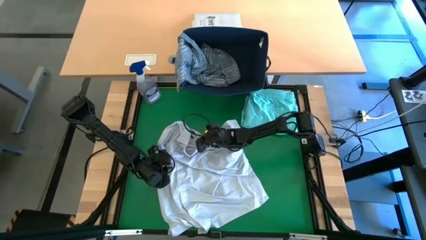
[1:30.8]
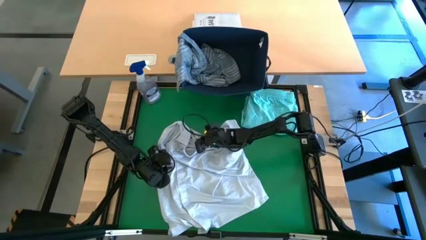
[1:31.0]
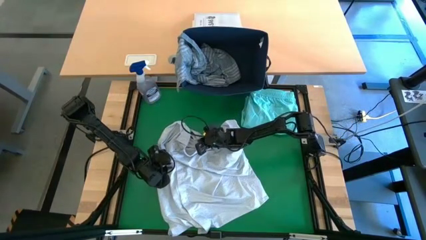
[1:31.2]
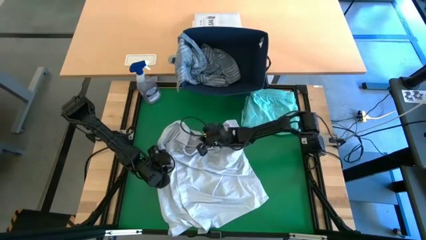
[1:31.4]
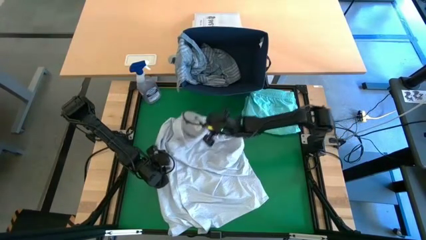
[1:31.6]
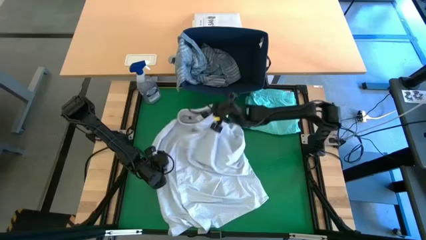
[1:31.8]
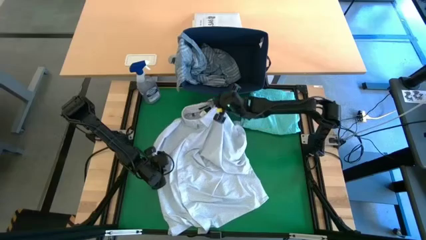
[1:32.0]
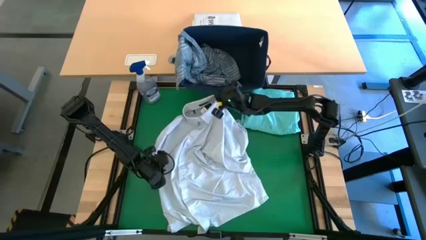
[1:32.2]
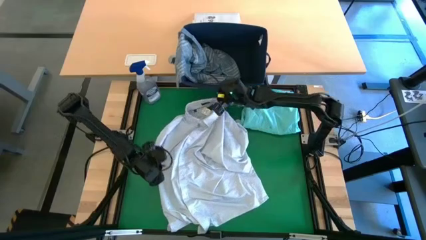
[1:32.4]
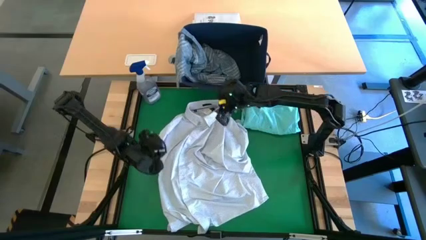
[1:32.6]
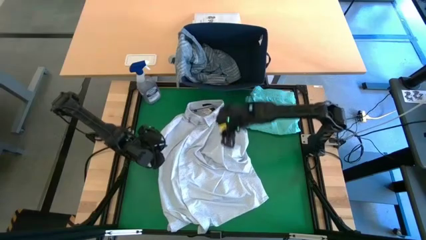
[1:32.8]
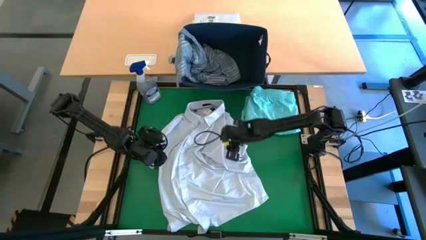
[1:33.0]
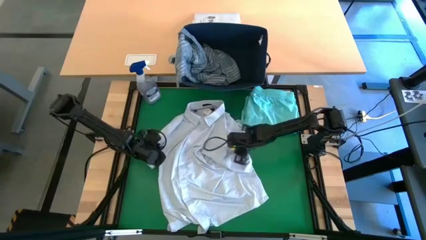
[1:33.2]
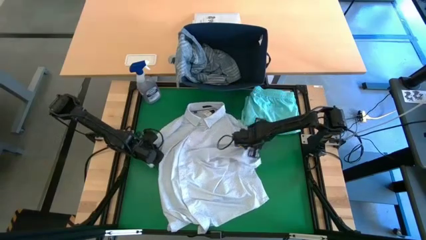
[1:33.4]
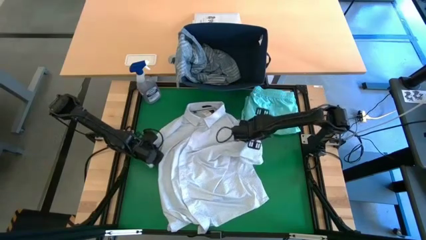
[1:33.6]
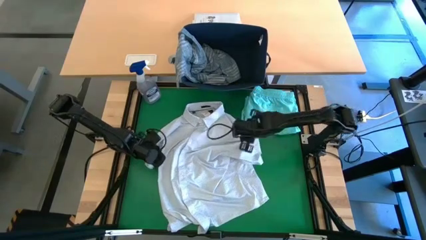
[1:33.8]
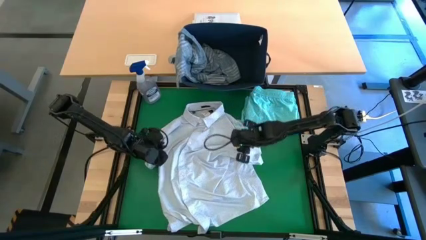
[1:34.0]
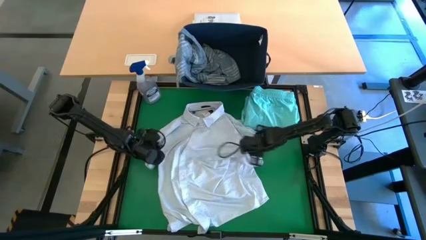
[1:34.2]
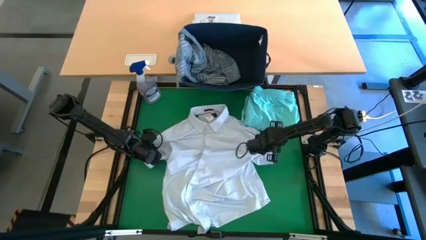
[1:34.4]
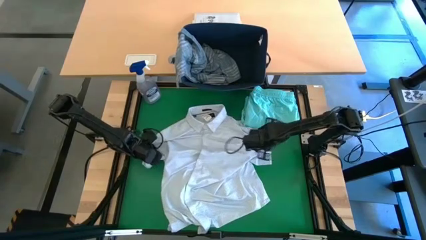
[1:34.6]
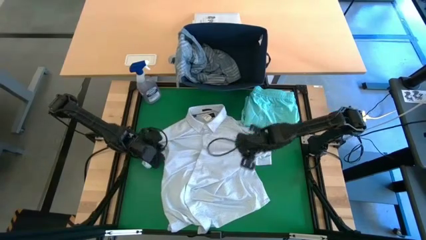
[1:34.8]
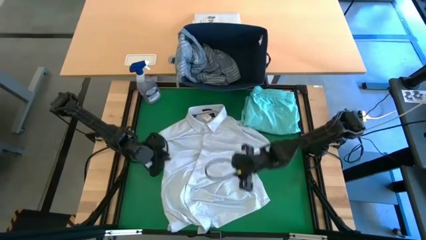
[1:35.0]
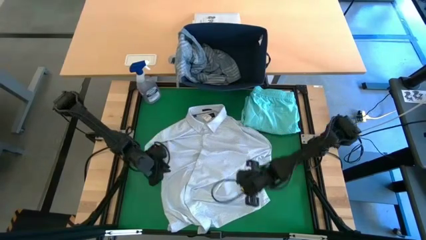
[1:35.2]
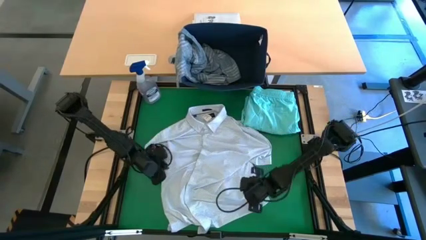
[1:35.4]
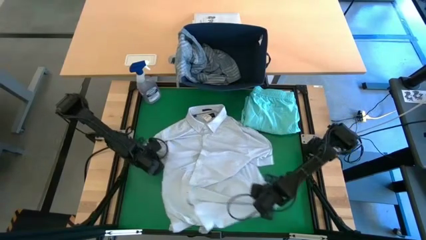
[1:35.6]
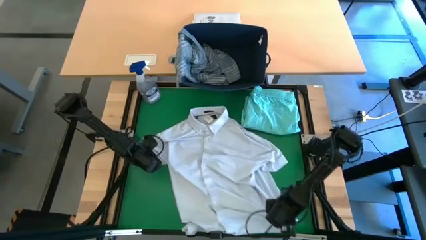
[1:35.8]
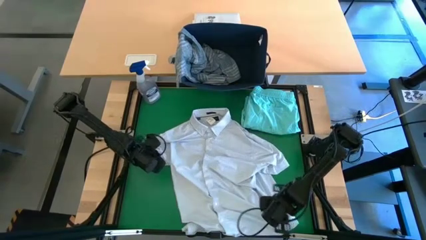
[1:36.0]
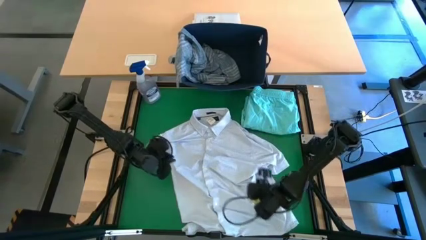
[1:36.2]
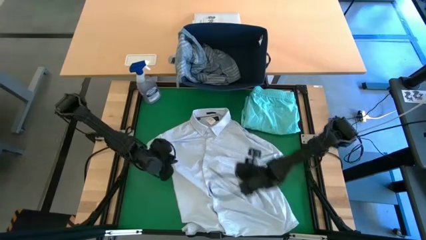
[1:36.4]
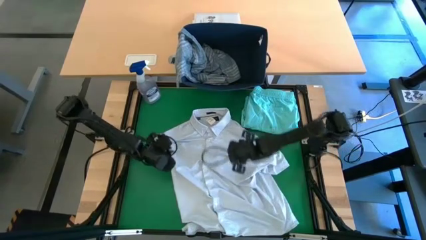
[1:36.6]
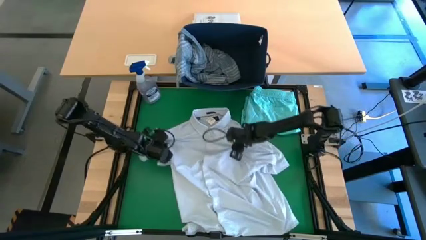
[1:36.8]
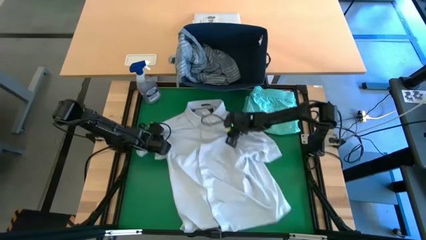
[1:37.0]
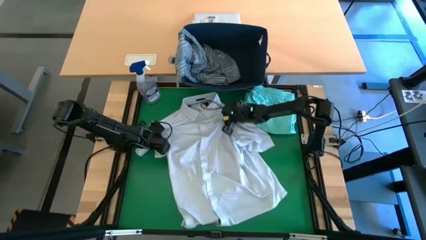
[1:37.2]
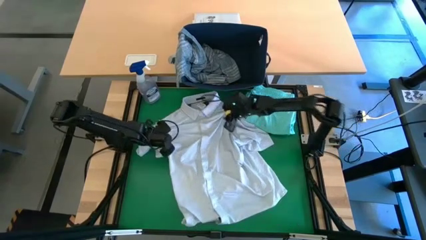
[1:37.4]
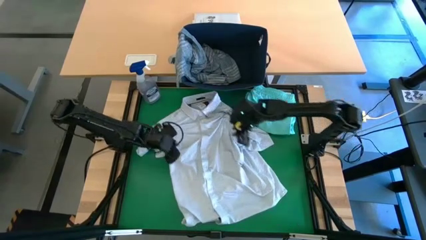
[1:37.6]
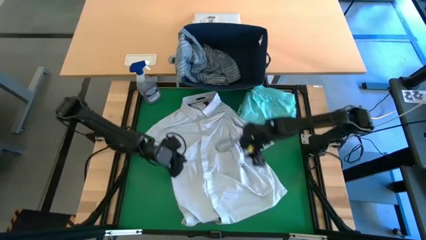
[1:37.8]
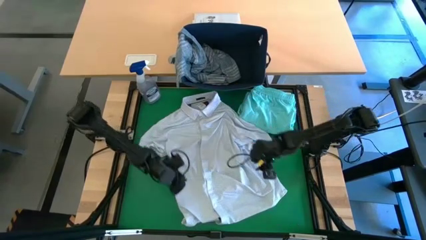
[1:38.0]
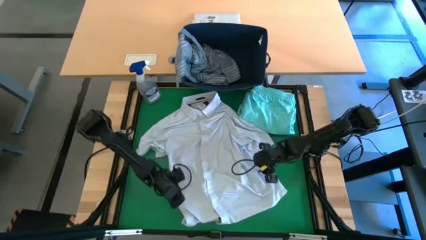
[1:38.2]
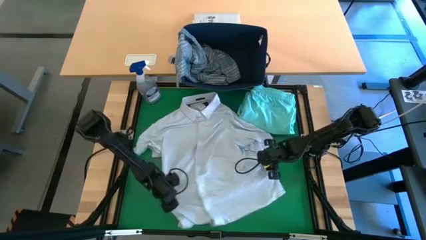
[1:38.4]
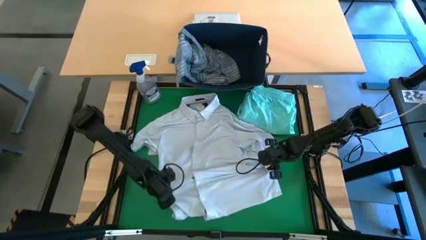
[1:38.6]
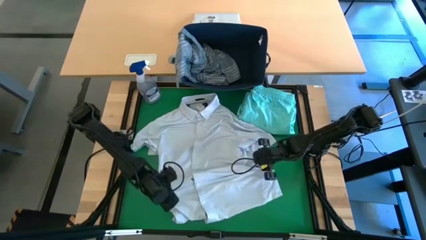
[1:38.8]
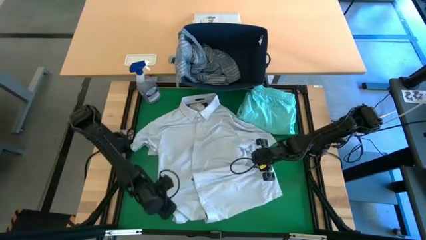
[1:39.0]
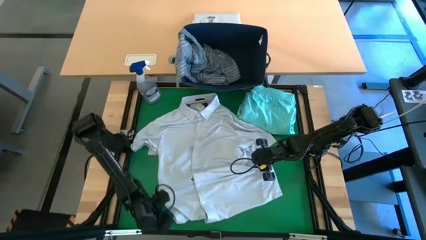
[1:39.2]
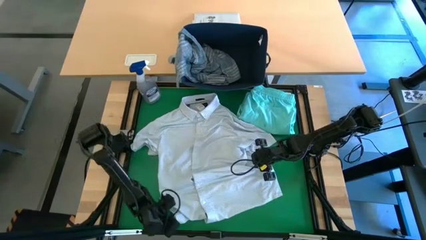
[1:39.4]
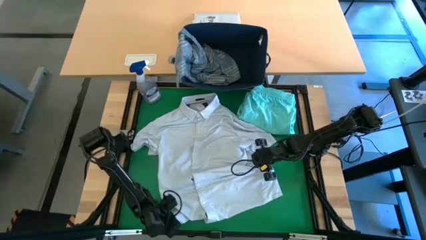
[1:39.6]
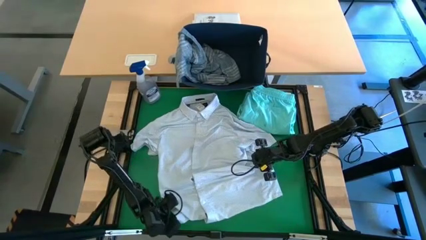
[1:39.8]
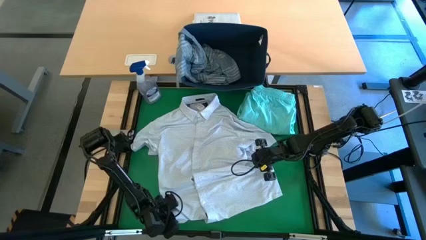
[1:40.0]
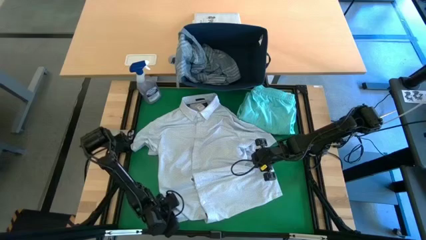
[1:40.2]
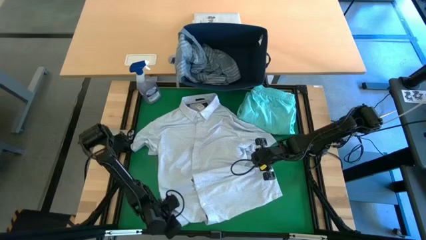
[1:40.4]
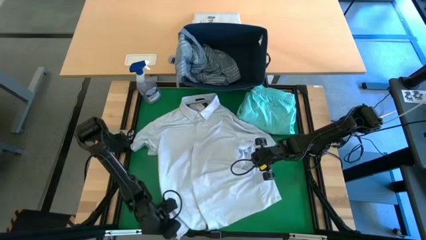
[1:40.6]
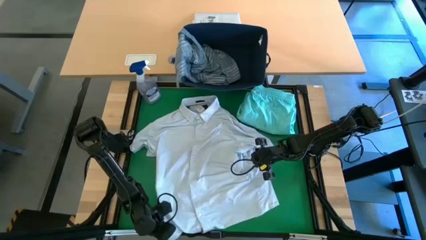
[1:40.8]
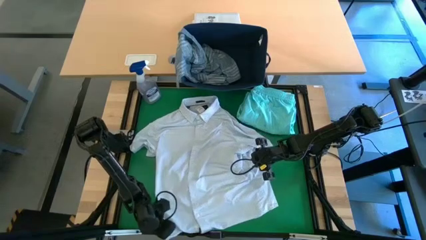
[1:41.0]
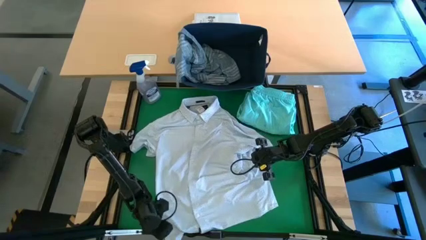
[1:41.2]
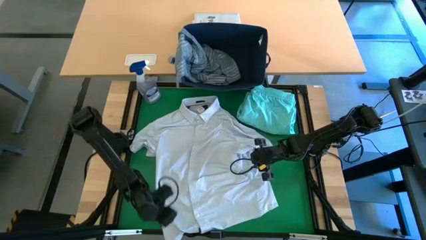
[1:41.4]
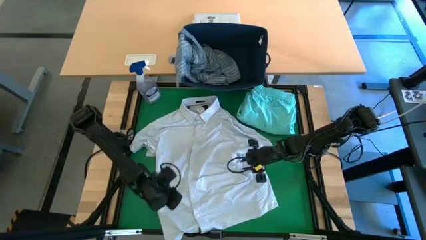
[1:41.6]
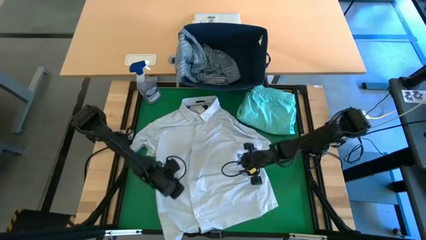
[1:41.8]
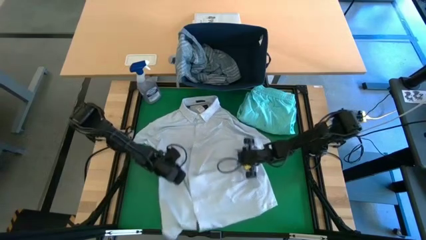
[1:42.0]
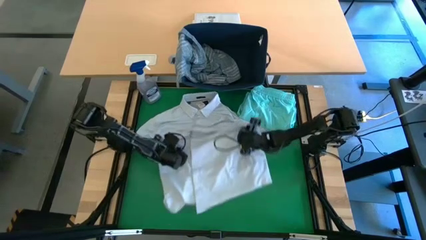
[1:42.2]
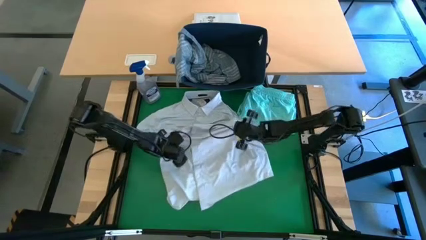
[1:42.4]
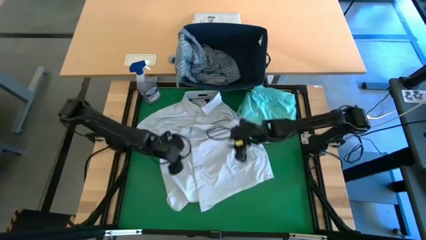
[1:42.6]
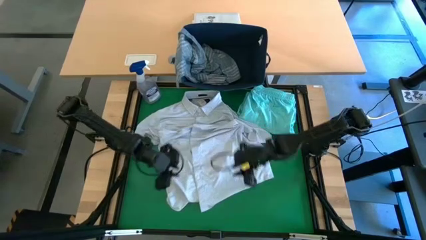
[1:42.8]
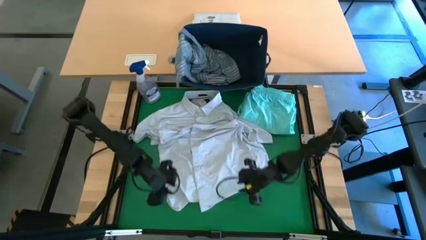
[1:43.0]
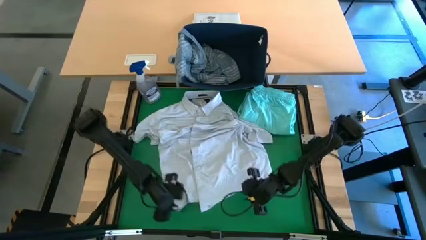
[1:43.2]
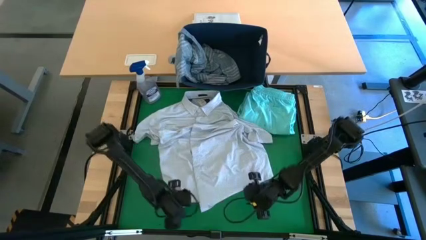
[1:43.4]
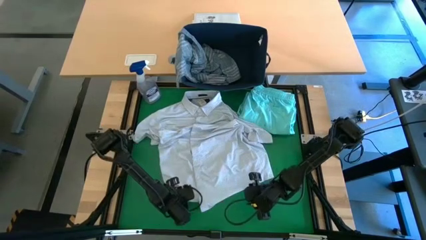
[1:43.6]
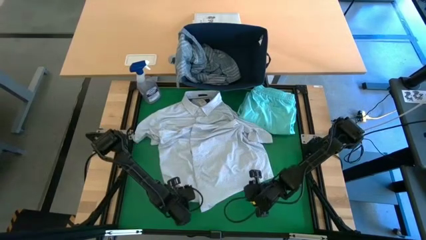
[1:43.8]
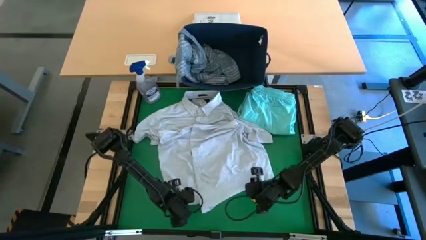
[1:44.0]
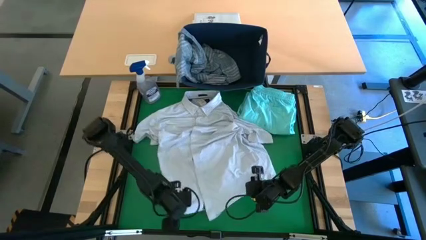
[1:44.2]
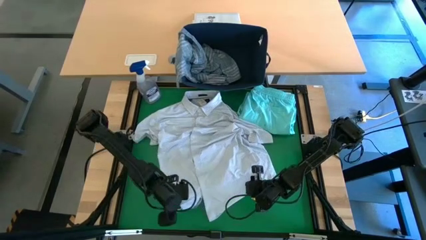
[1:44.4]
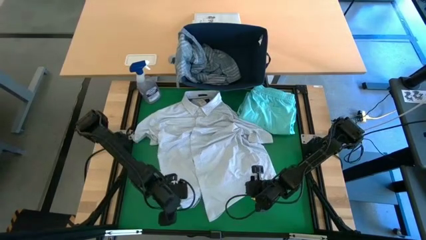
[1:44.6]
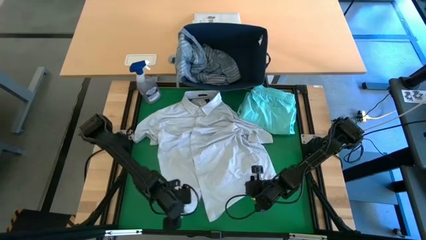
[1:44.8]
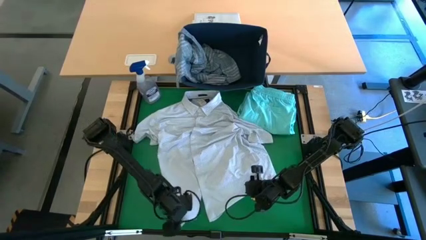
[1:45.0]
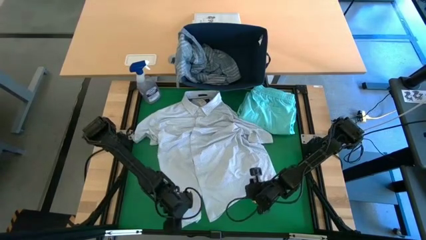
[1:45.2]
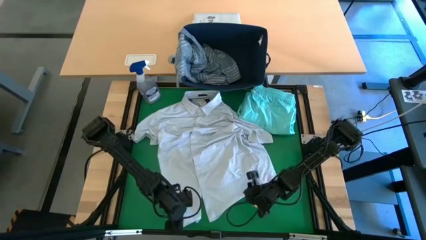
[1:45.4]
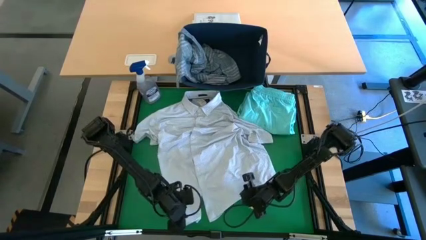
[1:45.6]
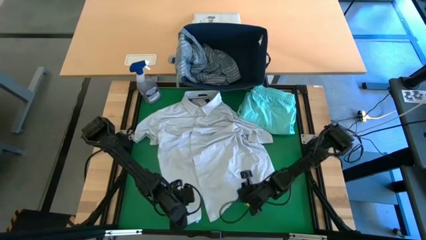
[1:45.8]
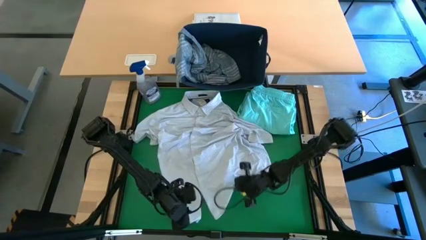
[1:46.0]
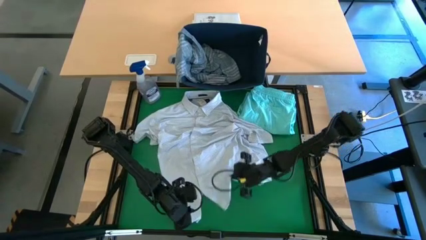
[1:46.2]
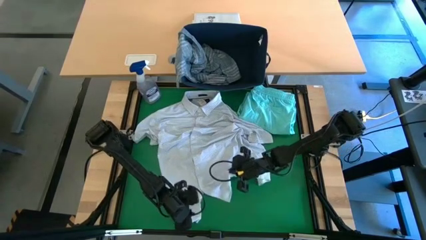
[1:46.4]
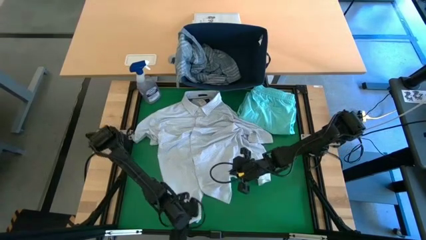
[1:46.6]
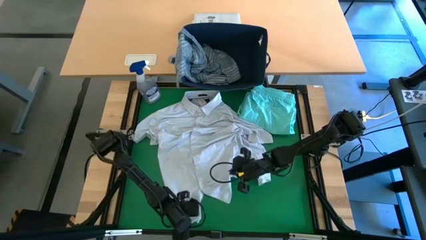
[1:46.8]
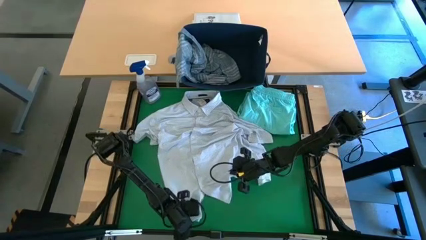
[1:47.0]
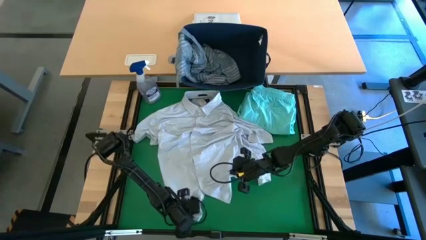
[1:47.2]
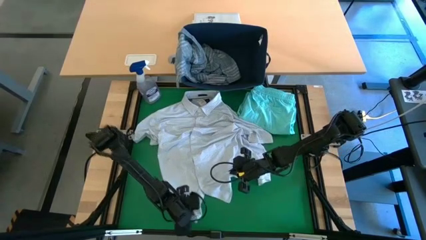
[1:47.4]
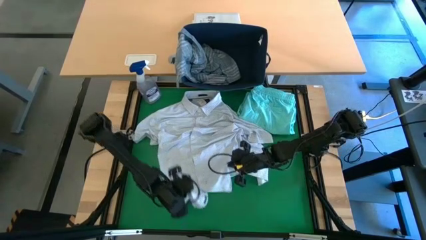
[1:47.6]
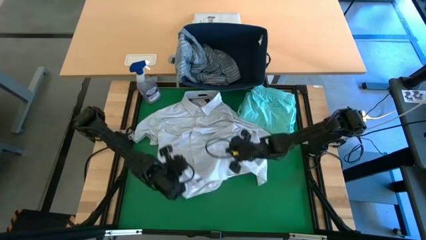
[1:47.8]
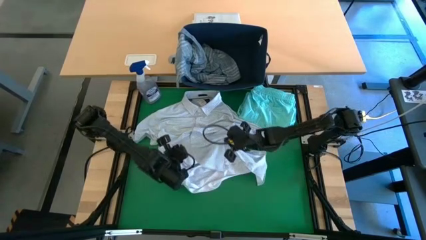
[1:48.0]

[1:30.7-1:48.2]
Task: Fold laundry
Fold the white polo shirt
